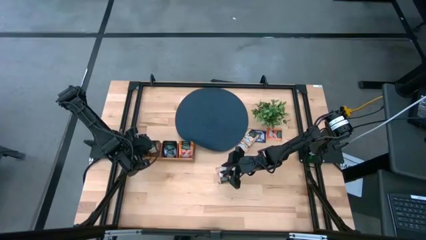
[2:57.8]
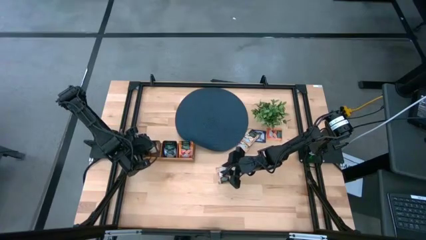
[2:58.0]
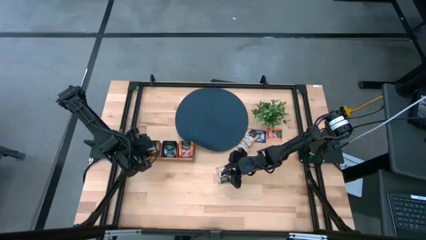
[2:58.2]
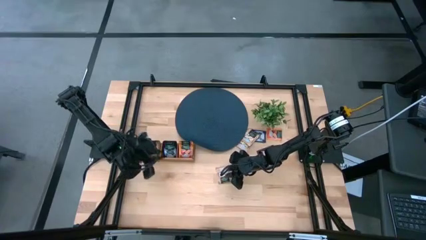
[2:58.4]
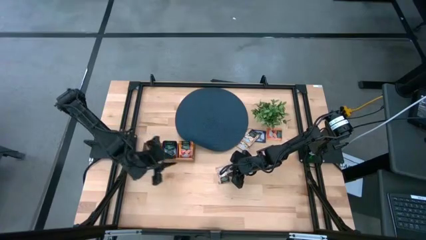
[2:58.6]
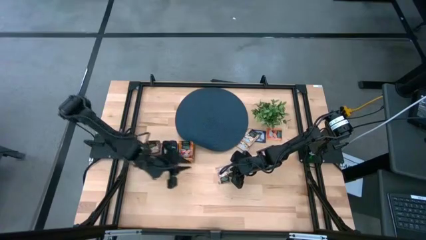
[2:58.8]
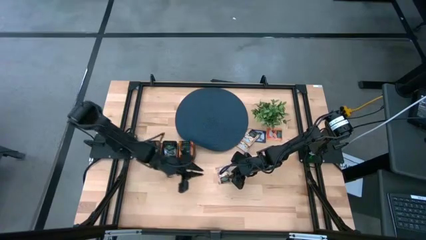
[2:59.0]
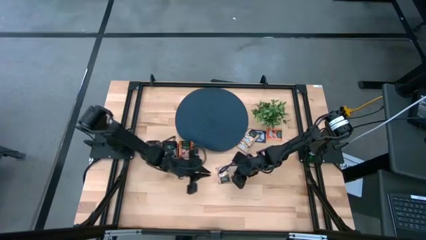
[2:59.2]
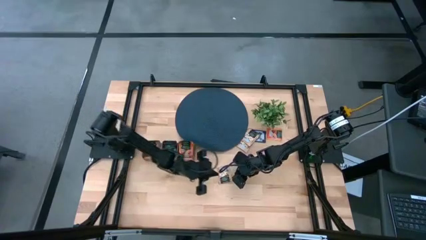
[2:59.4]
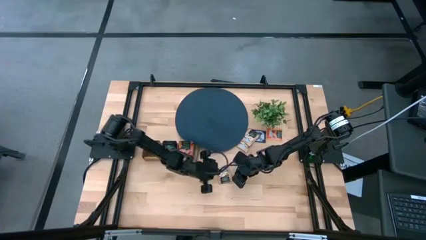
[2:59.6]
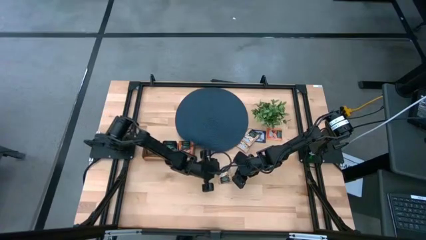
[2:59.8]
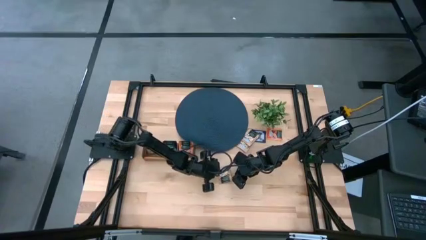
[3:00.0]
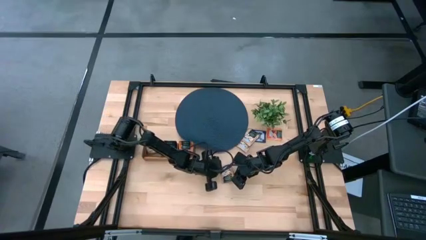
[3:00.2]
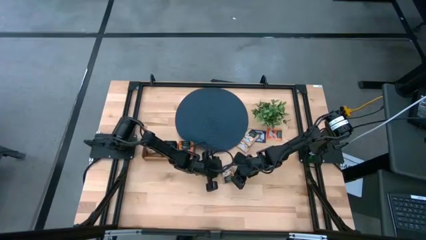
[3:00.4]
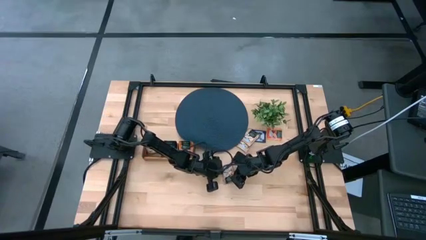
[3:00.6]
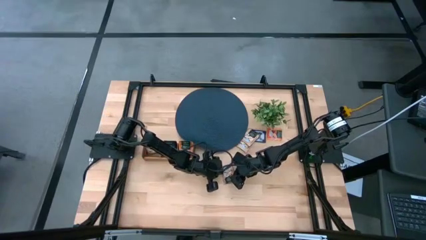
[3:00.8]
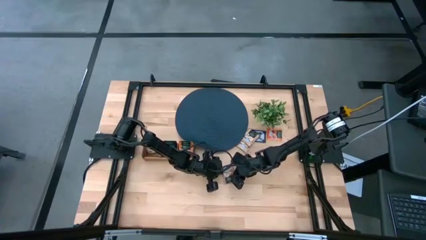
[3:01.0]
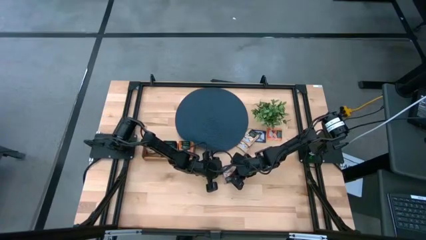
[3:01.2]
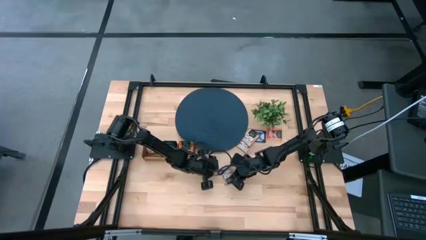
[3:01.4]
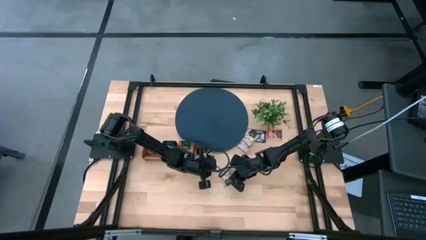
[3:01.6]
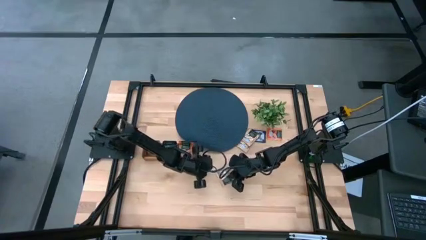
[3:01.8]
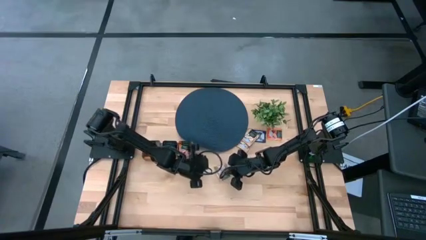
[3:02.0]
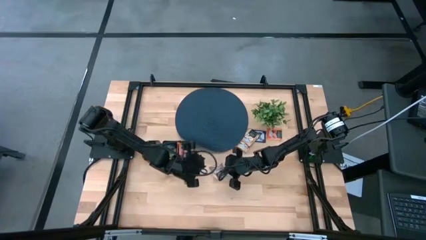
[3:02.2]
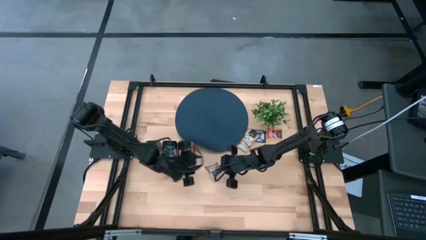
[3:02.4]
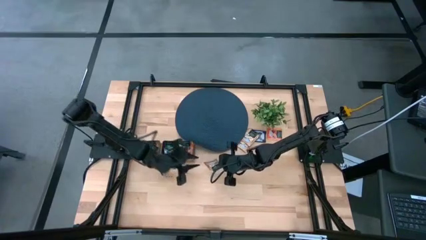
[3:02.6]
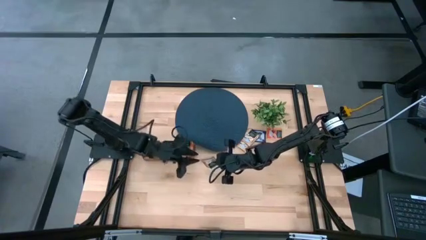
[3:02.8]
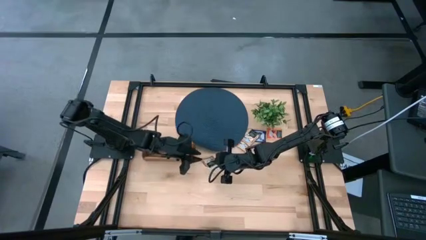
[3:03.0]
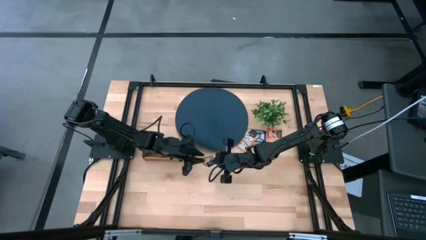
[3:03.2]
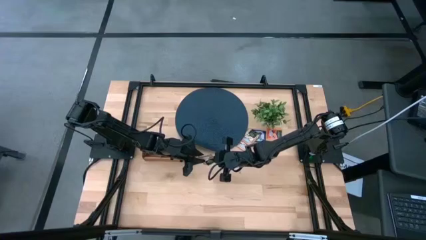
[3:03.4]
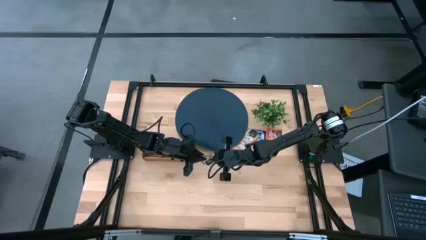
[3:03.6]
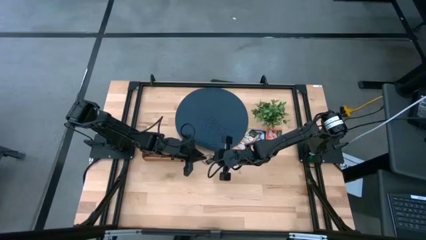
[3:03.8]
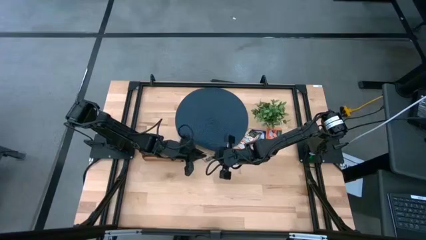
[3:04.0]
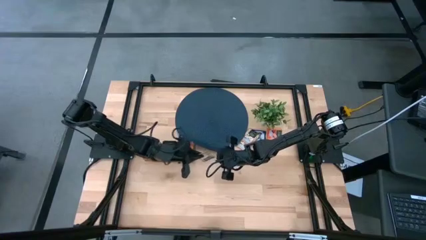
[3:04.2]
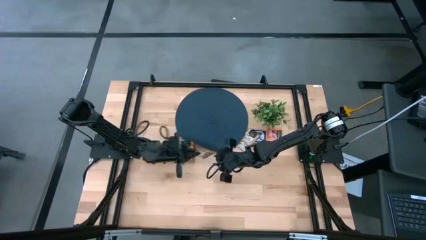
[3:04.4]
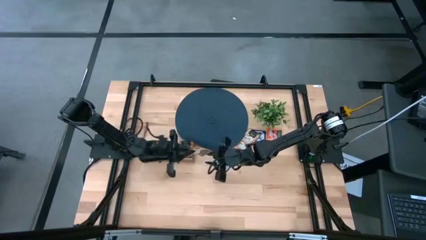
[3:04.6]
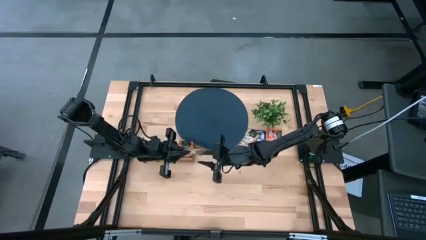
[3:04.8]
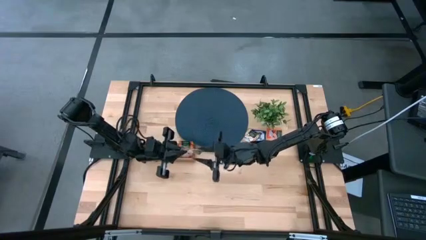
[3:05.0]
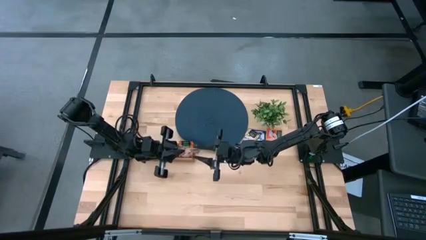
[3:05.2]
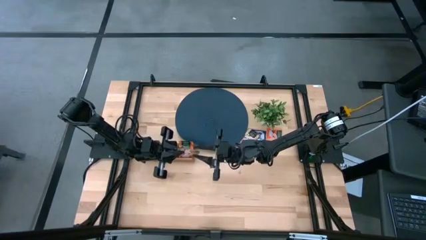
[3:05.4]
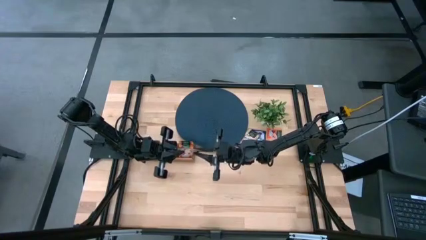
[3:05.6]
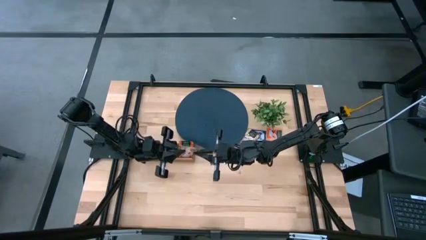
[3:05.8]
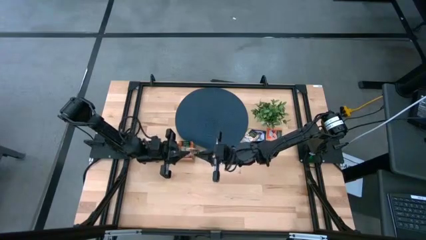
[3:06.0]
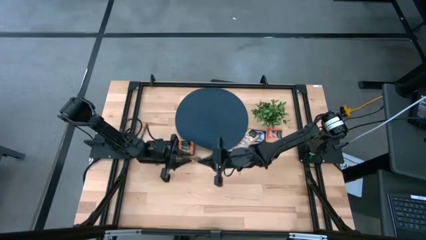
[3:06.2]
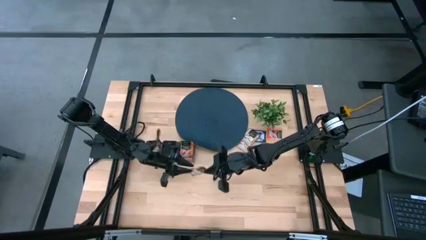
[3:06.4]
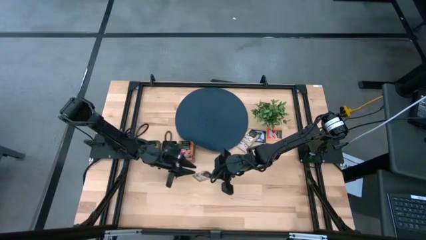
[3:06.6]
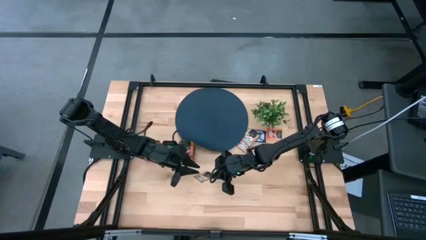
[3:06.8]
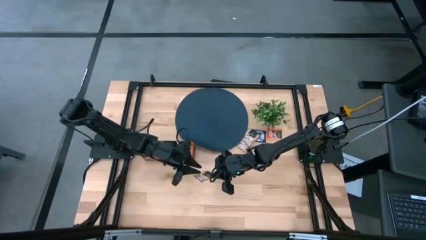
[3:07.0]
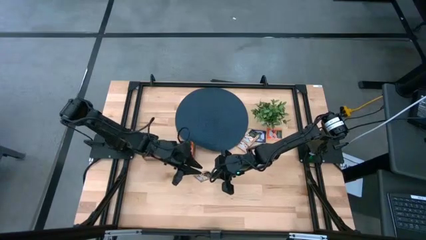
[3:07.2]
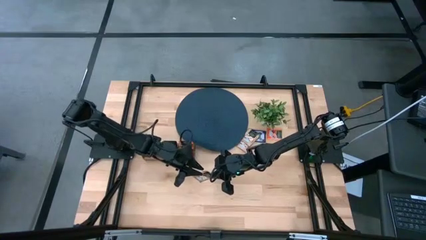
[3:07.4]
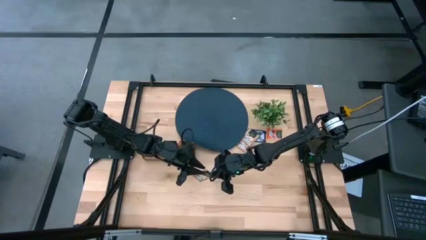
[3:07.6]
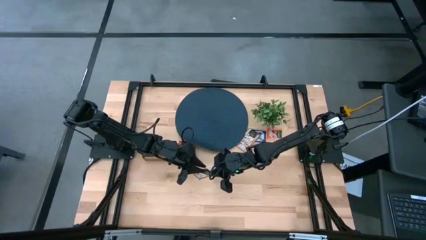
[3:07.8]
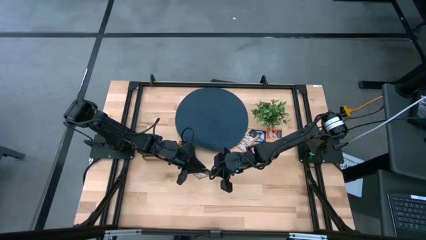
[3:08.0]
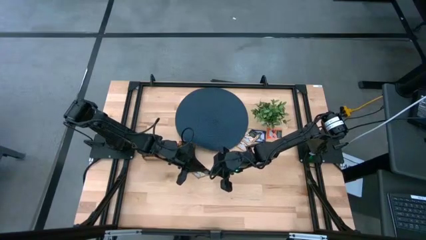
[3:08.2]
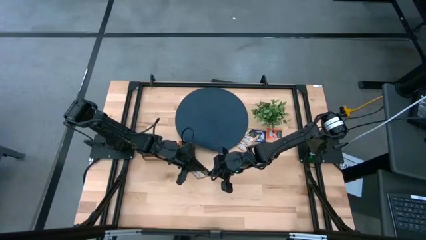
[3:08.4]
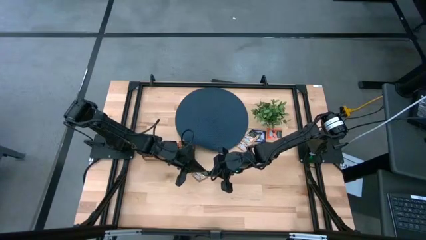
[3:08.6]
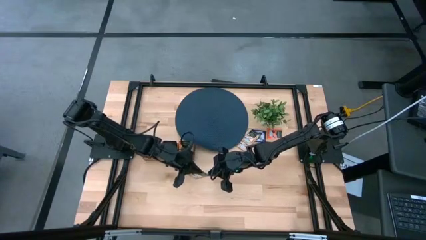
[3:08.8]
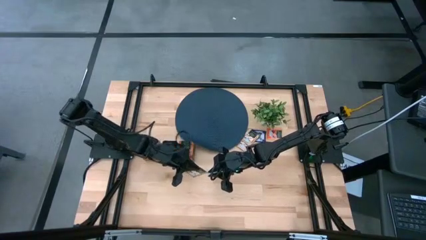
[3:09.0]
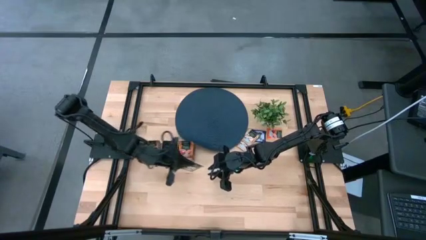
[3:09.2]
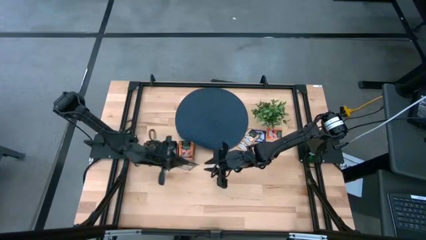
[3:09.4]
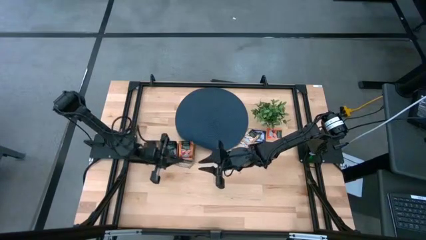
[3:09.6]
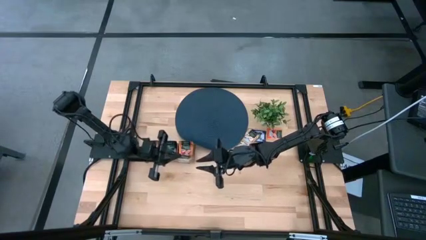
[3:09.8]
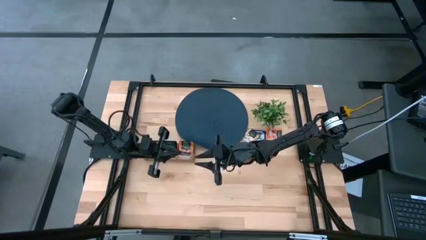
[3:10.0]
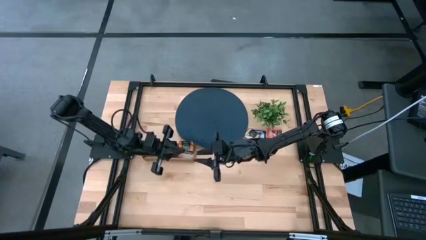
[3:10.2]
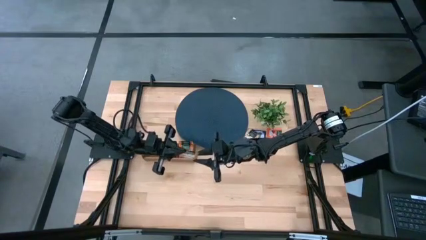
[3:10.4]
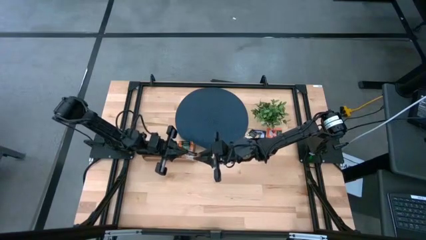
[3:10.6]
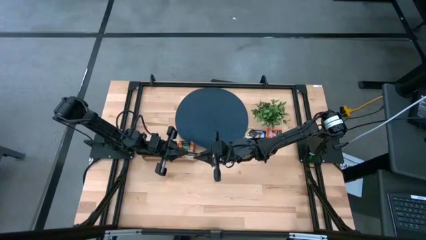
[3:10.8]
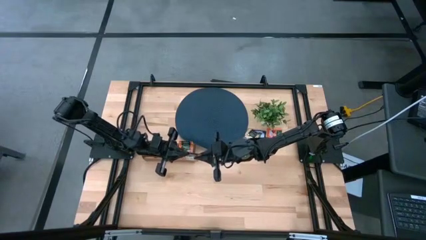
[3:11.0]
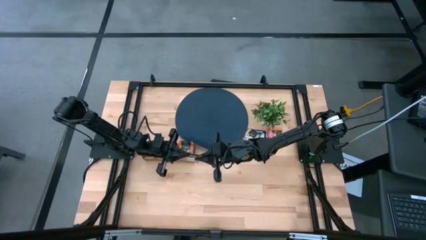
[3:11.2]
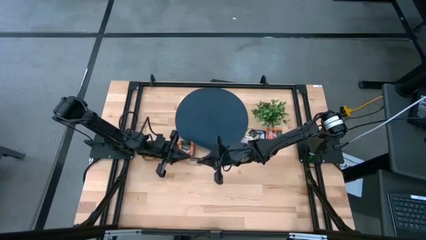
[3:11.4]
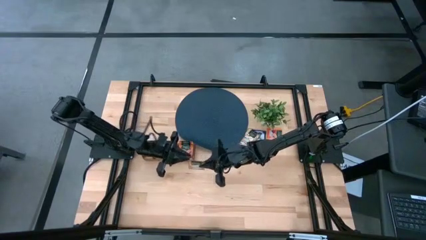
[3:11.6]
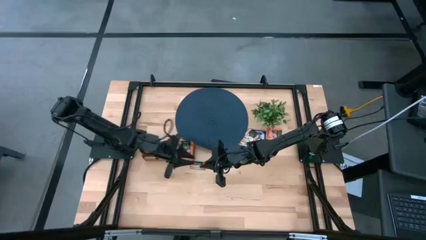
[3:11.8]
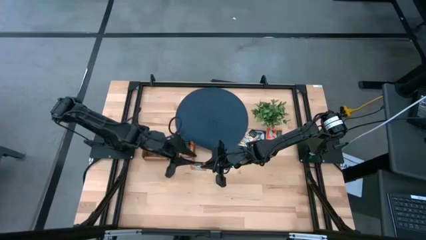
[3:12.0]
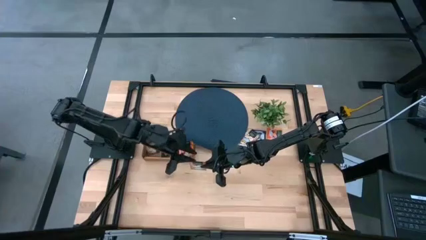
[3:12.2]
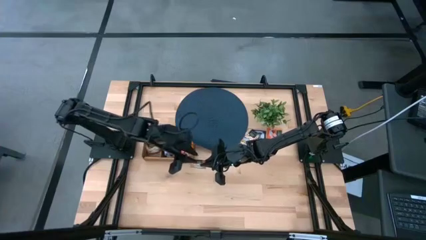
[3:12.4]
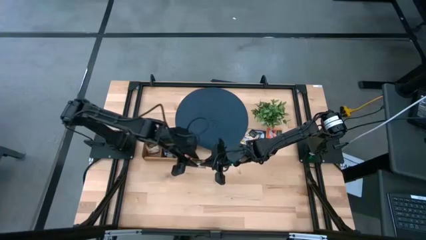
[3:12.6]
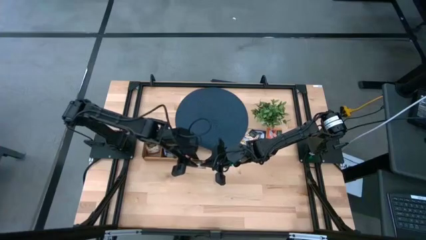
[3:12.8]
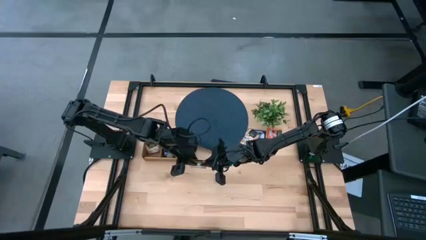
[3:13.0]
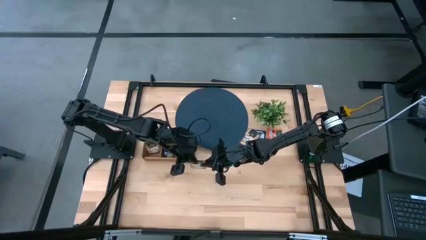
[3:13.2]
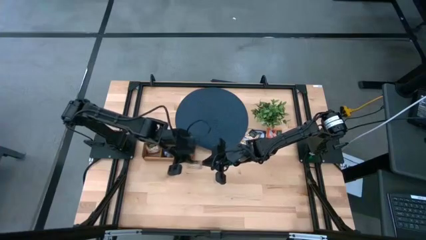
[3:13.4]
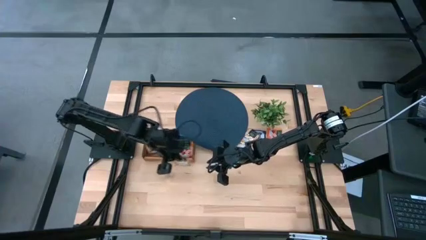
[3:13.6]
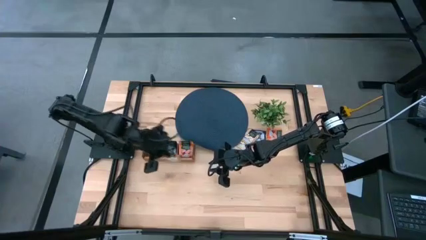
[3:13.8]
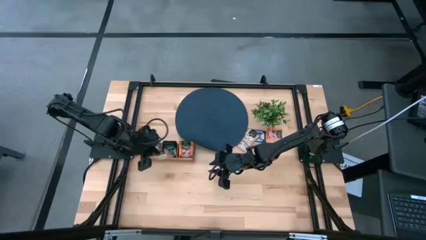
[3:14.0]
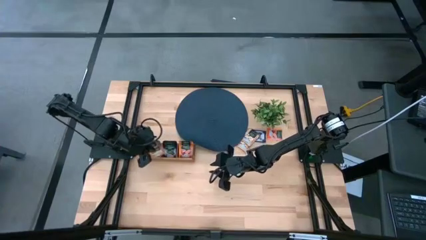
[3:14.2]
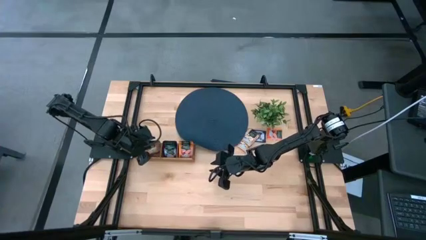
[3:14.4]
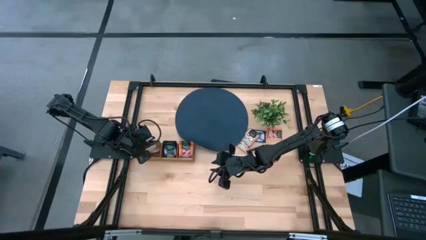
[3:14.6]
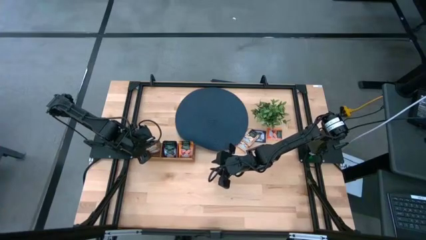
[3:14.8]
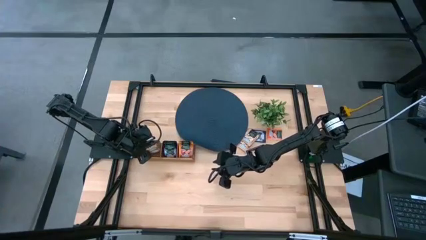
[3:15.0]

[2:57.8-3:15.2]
Task: Pick & Place Tea
Put the brown tea bag into the left section of the wooden organizer
